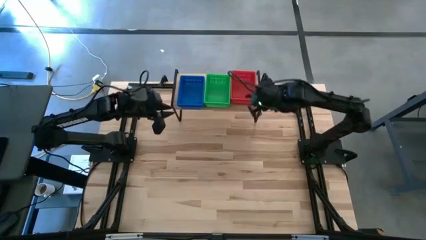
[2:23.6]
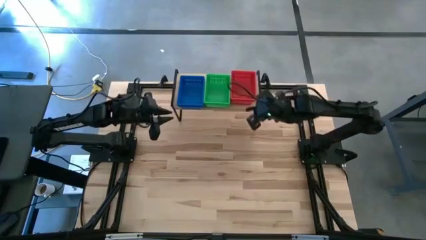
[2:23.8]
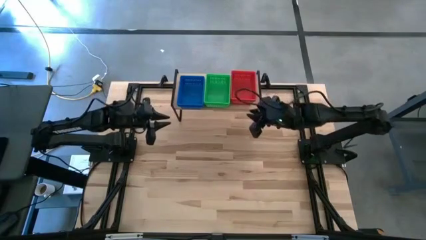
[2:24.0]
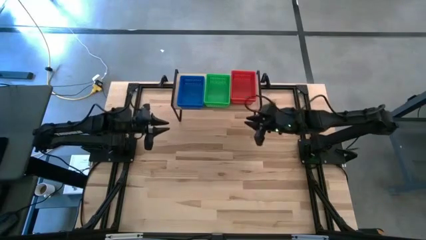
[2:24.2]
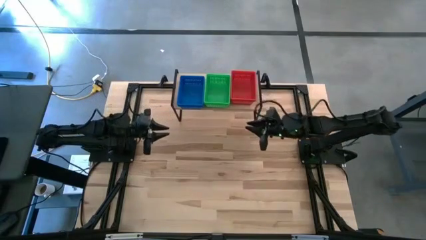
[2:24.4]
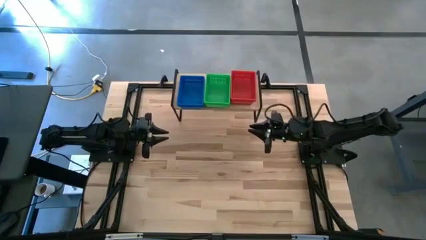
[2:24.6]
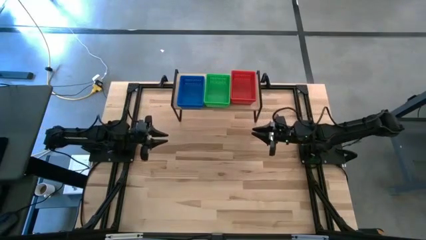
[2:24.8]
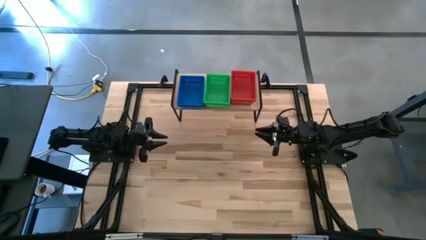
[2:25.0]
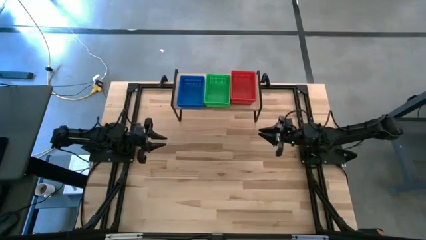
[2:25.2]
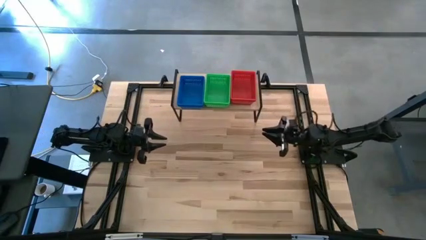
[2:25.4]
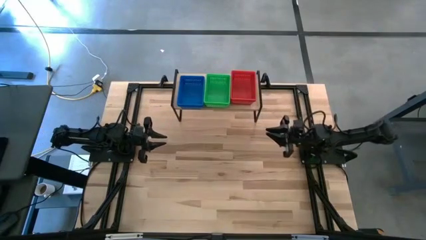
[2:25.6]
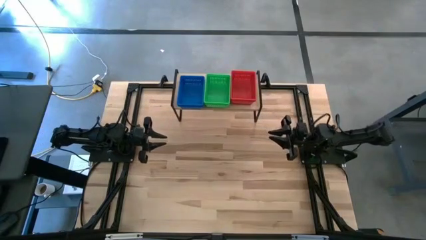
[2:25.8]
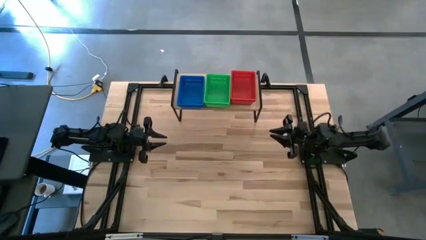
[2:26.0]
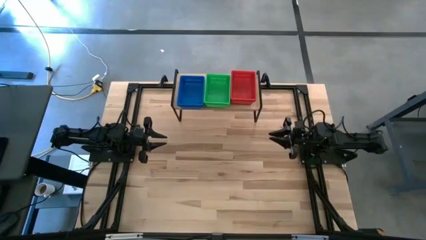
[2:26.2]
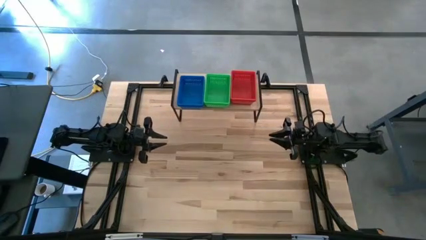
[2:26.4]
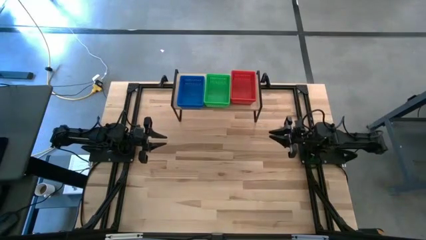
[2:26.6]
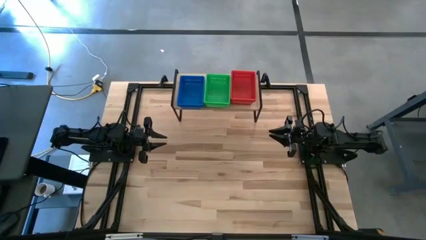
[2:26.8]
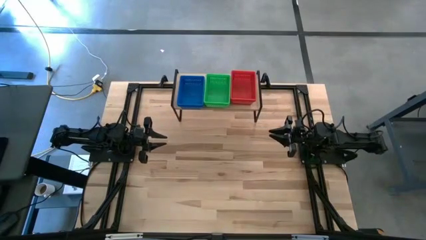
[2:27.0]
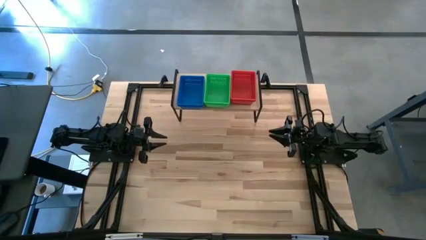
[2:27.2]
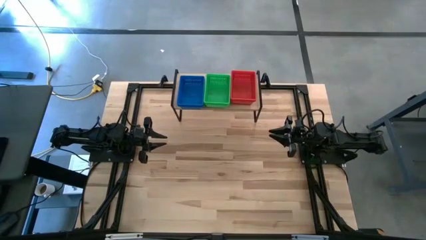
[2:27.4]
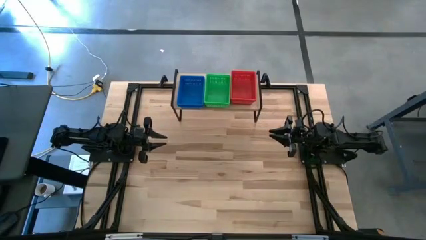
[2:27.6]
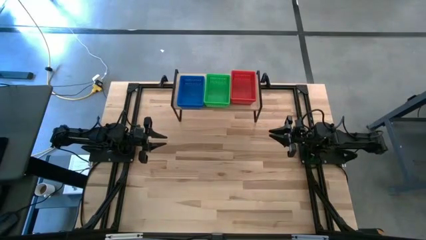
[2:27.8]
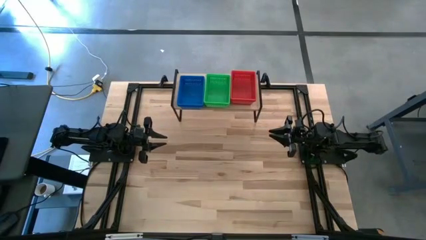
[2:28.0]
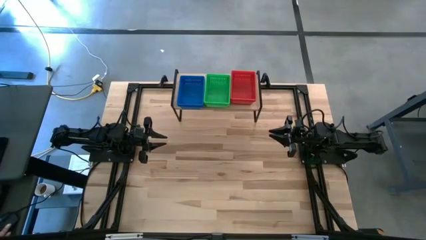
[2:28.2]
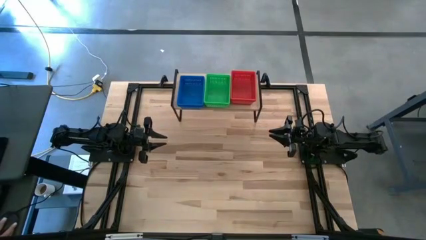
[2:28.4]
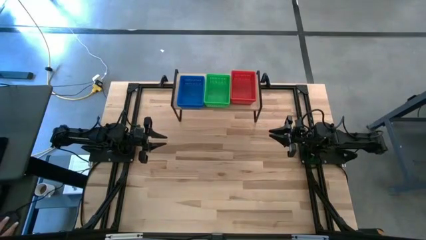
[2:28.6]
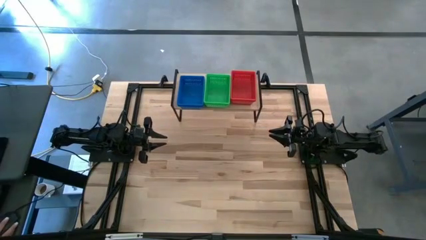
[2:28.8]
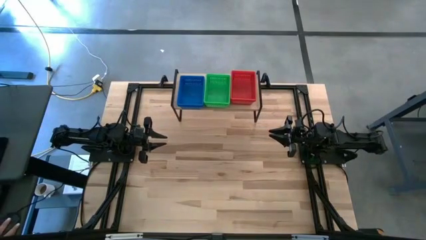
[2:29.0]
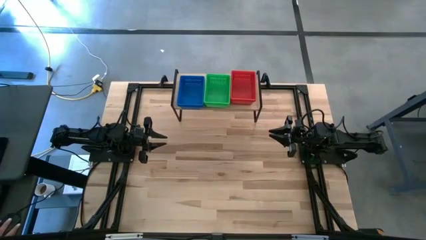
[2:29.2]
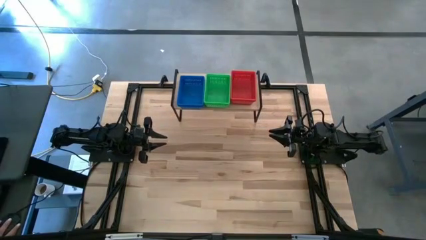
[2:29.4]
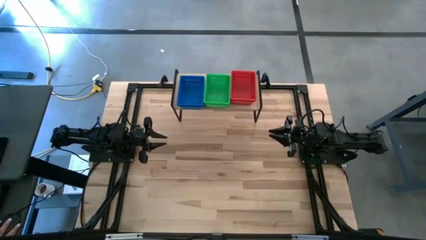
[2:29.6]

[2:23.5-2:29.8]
Task: Stack baskets on shelf by color
Return to Home Position

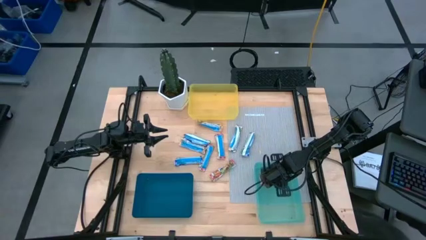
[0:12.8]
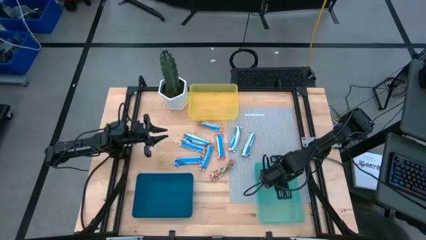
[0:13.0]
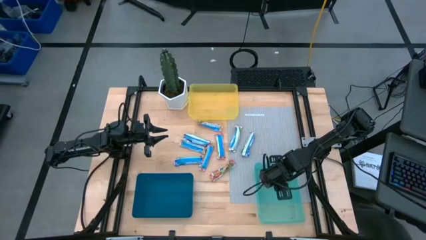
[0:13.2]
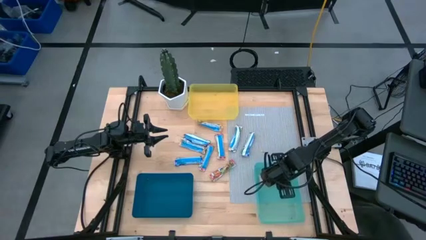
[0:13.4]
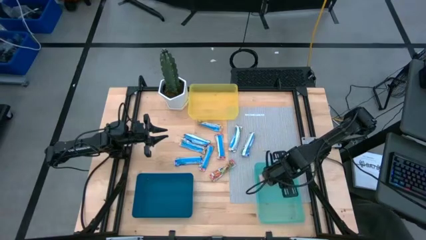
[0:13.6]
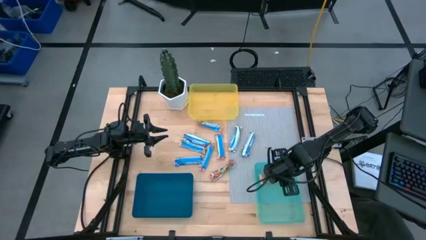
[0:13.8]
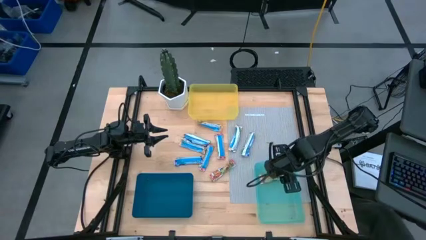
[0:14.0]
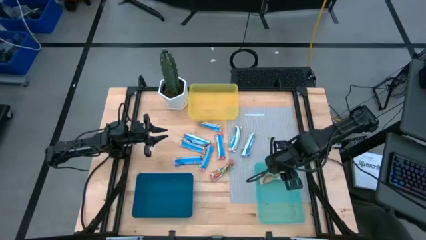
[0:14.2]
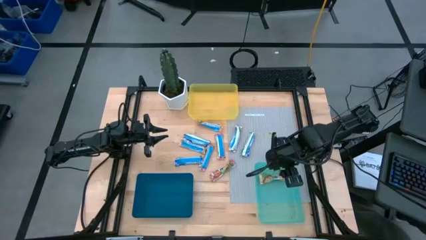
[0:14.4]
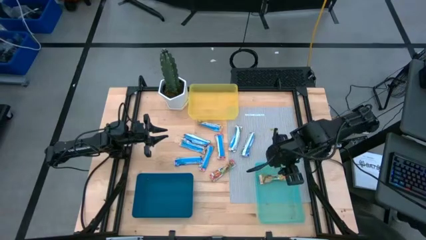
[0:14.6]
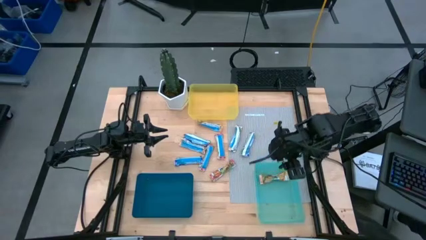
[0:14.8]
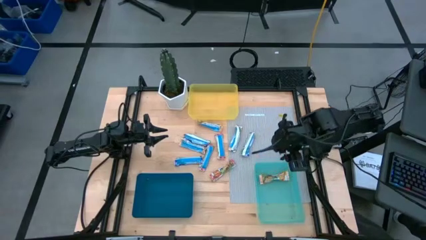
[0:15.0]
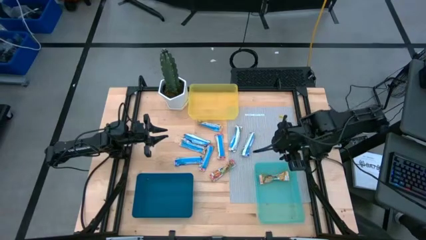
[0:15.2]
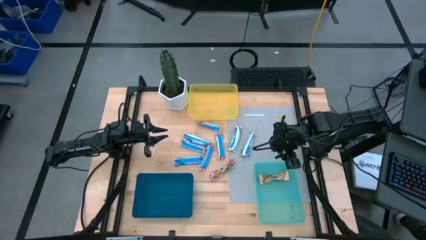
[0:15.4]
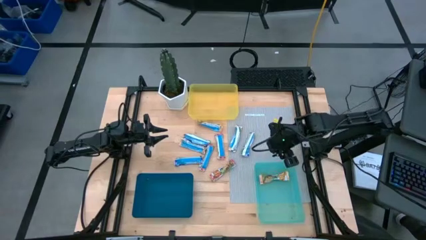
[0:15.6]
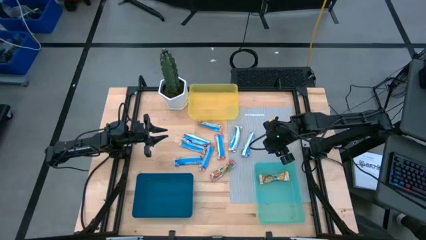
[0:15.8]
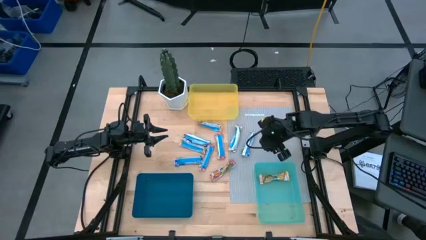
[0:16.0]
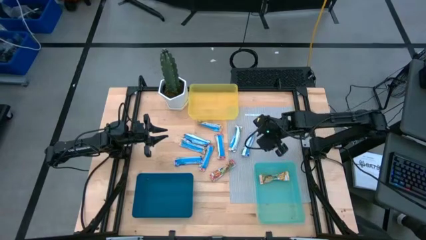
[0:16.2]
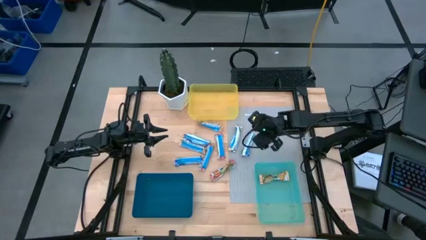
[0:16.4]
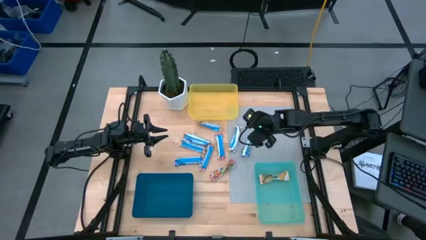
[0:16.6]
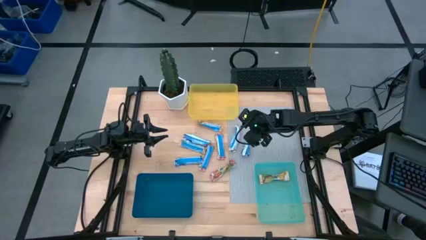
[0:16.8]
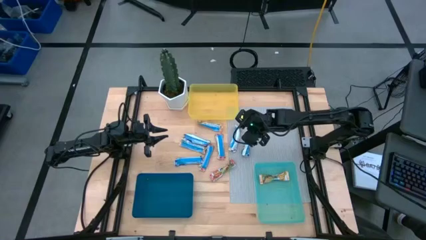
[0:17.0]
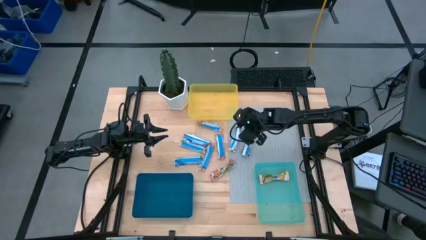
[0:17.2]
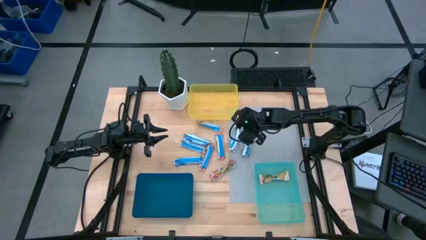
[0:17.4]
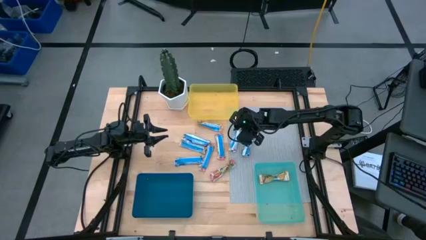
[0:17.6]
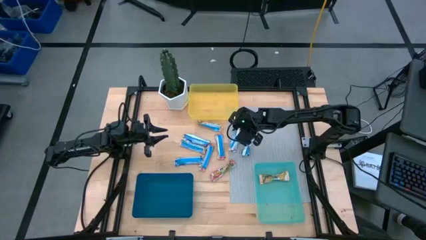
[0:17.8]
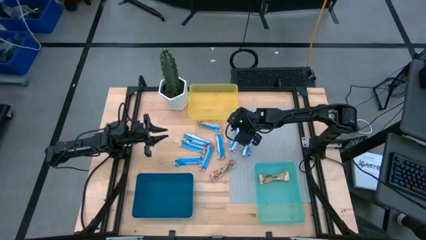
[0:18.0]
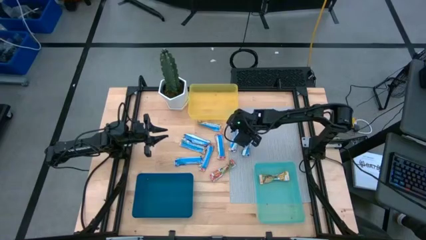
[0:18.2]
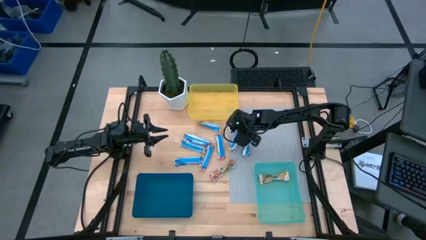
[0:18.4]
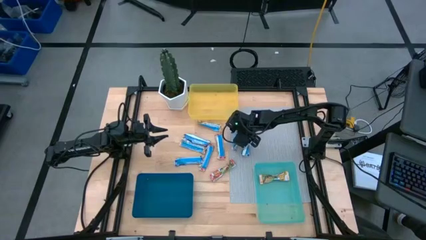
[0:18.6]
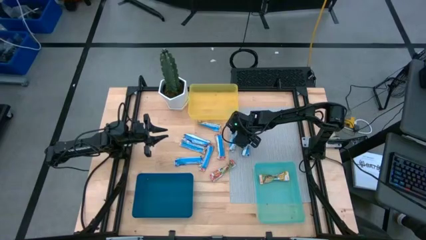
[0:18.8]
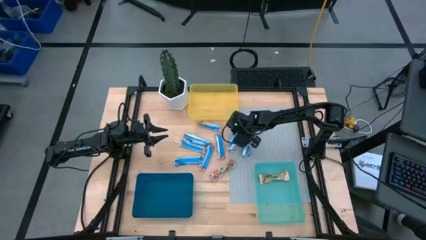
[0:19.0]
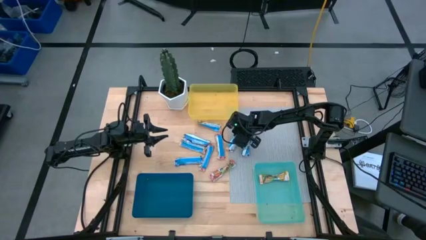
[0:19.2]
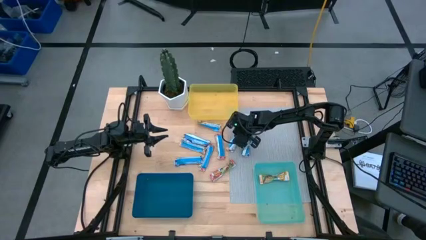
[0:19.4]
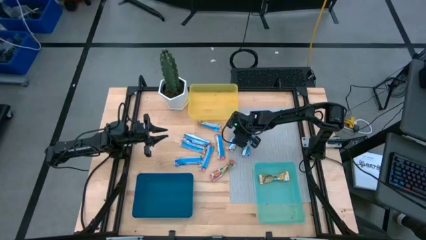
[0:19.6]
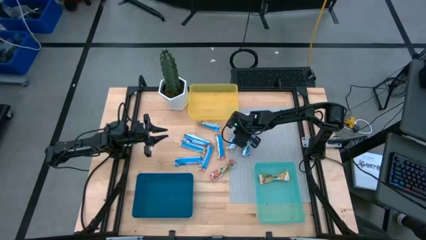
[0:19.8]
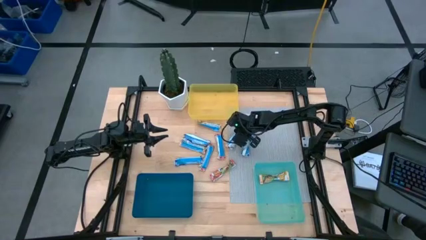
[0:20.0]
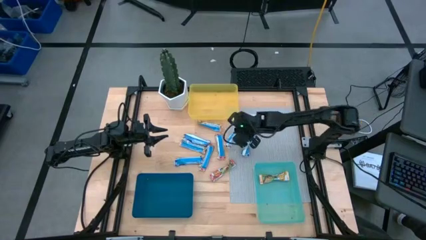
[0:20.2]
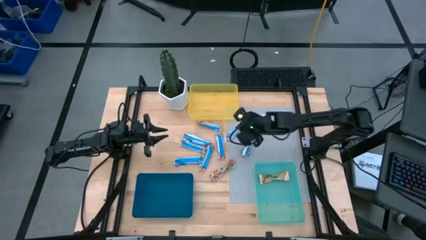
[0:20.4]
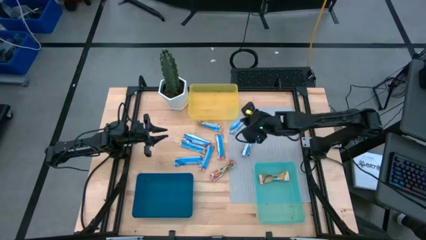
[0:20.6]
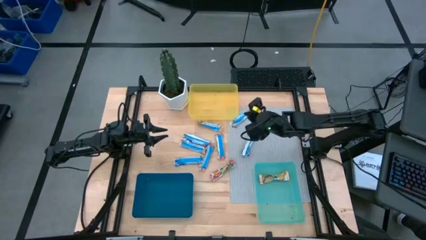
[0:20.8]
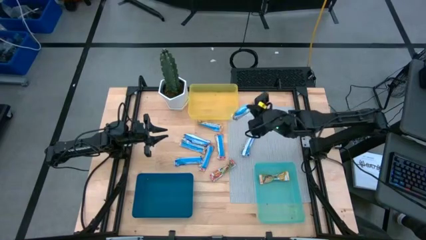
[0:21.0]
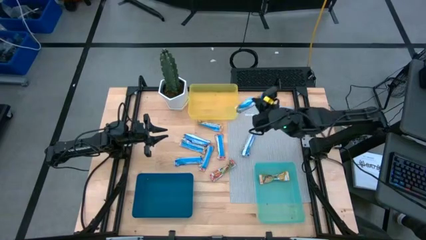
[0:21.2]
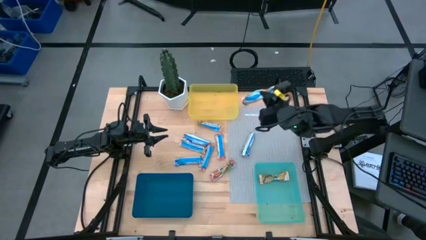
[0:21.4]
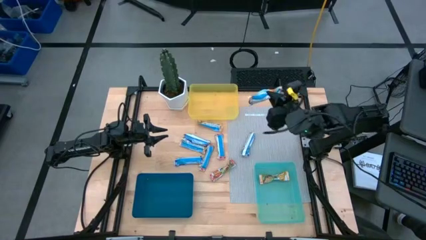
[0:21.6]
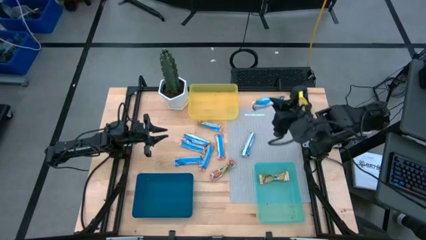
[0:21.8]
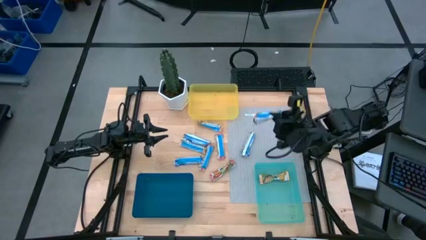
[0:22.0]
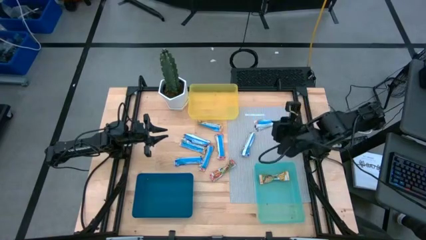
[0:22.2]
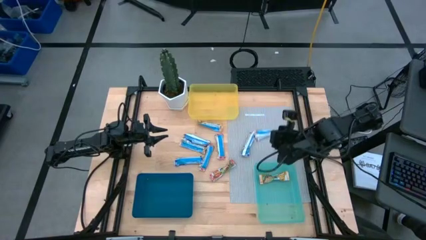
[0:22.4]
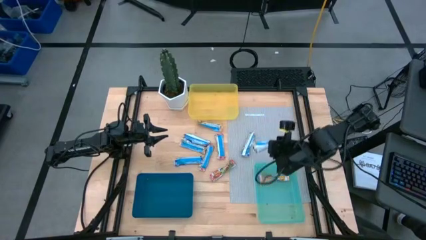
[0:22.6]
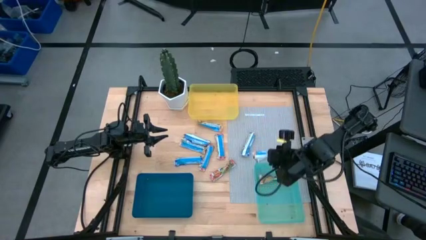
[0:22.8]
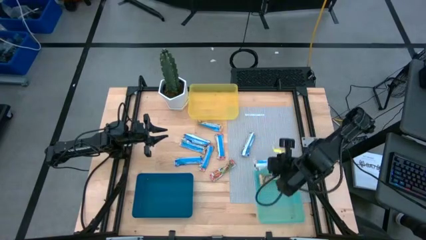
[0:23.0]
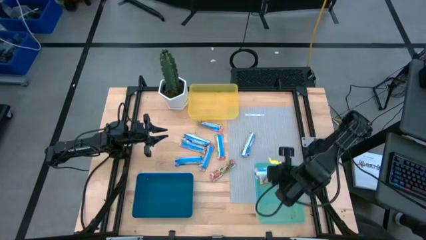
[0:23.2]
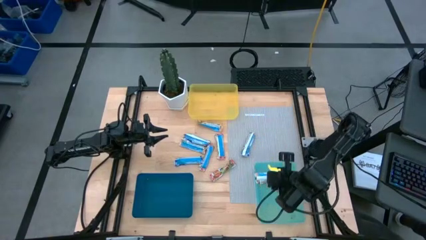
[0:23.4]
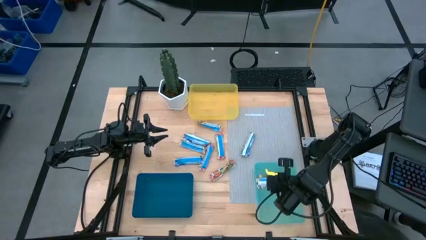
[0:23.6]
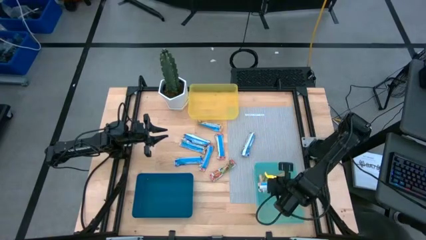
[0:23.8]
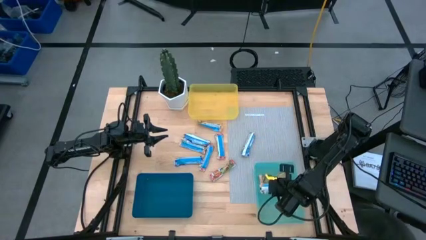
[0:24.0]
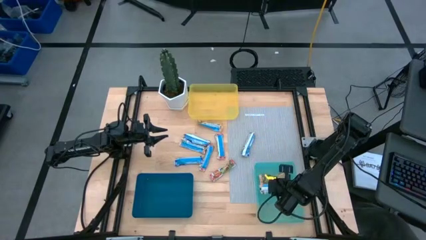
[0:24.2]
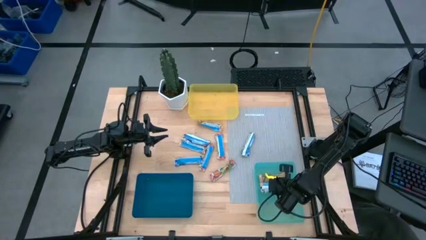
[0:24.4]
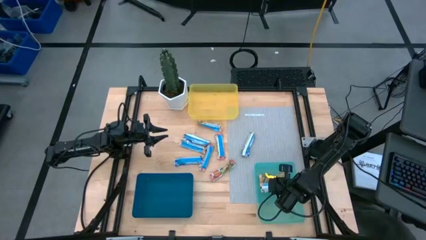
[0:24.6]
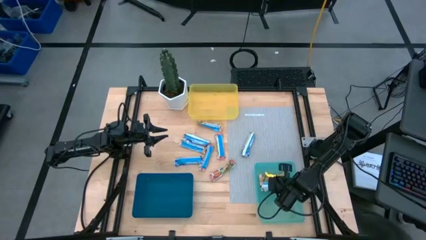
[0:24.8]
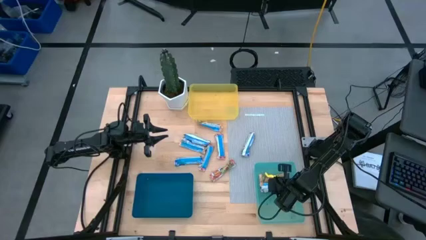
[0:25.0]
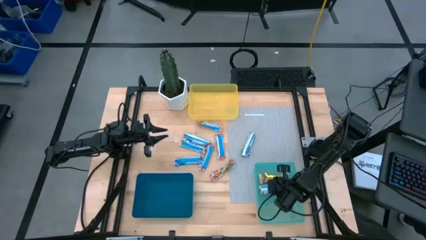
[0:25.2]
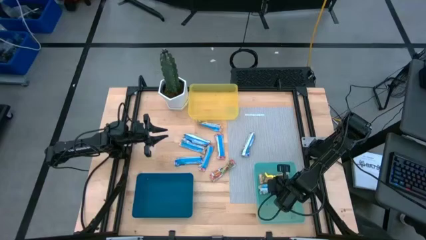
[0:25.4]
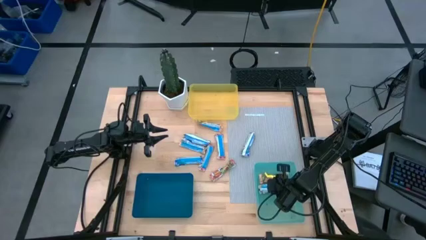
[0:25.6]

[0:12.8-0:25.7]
Task: Pick and place Granola Bars by type
Put the yellow granola bar into the green bin
